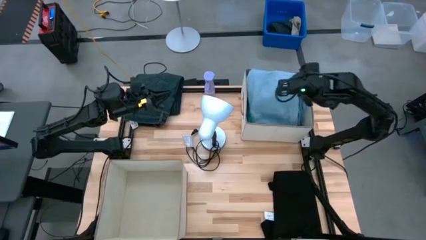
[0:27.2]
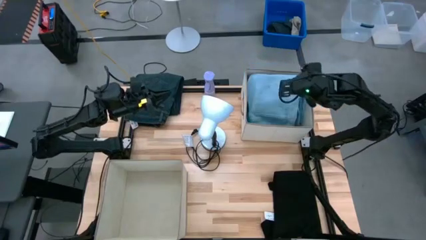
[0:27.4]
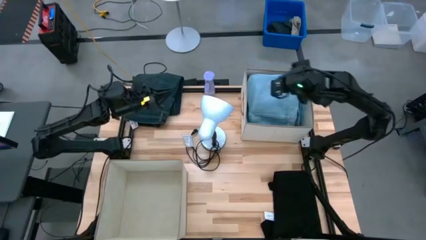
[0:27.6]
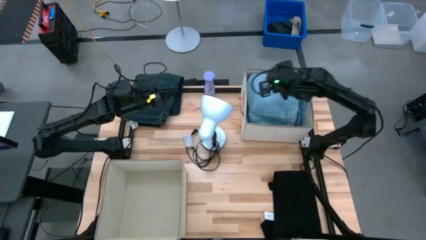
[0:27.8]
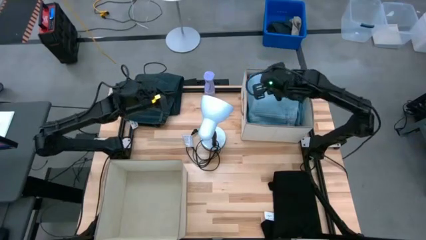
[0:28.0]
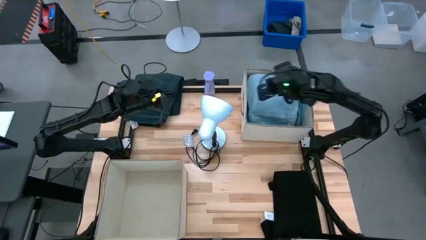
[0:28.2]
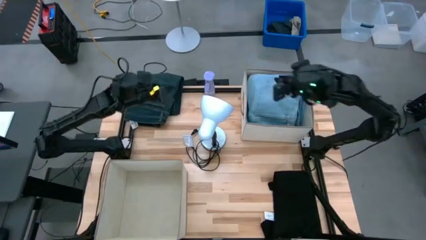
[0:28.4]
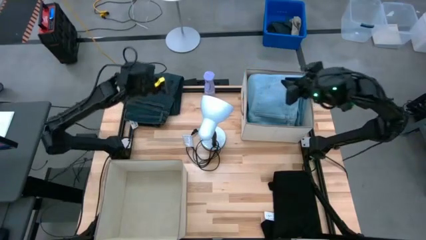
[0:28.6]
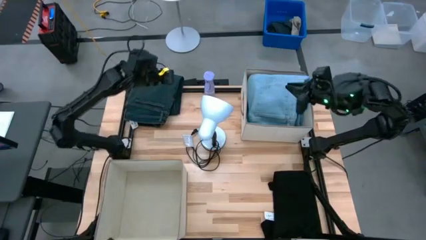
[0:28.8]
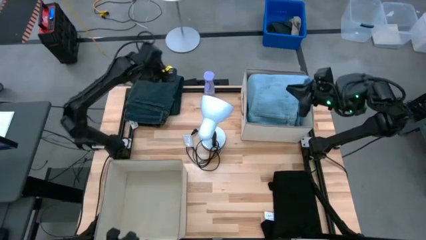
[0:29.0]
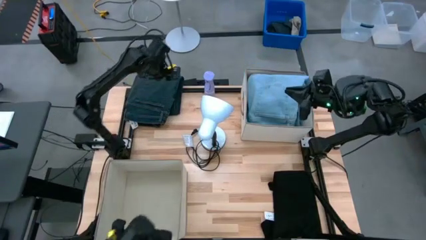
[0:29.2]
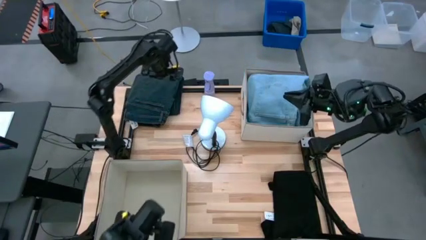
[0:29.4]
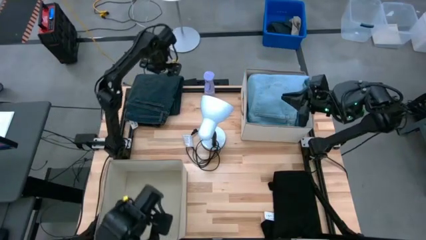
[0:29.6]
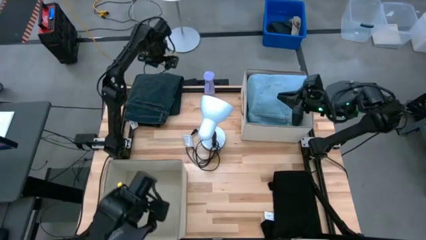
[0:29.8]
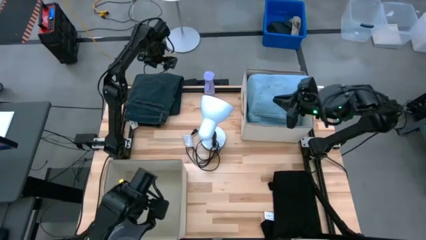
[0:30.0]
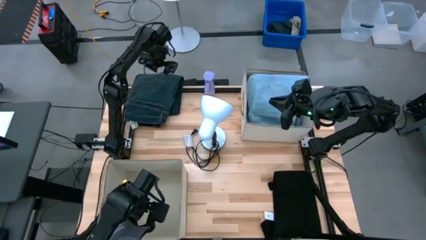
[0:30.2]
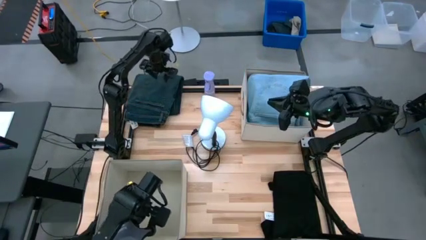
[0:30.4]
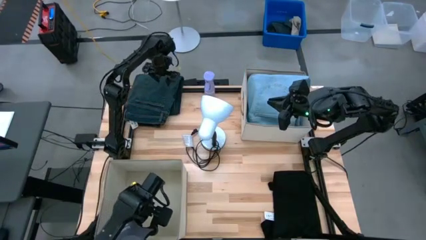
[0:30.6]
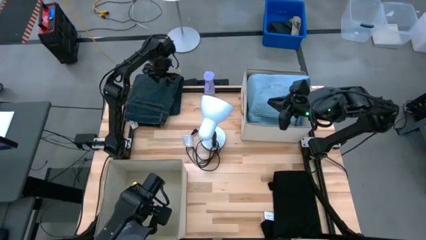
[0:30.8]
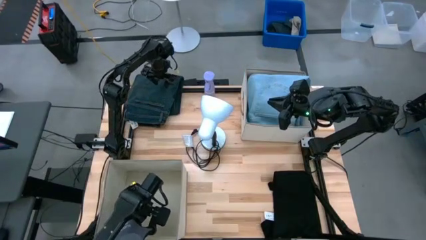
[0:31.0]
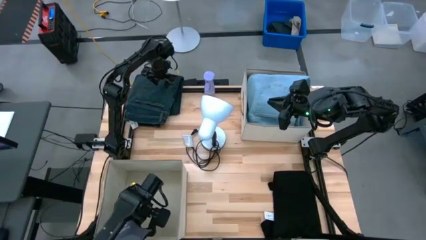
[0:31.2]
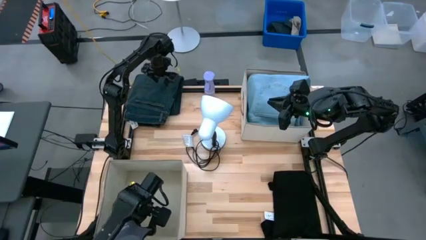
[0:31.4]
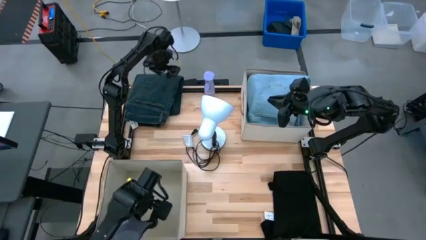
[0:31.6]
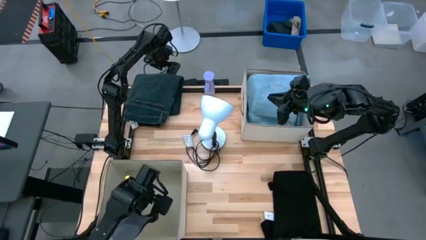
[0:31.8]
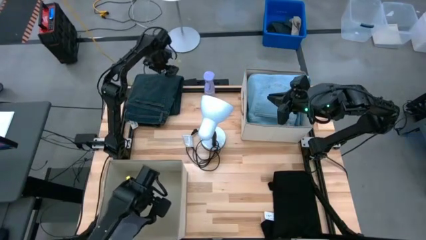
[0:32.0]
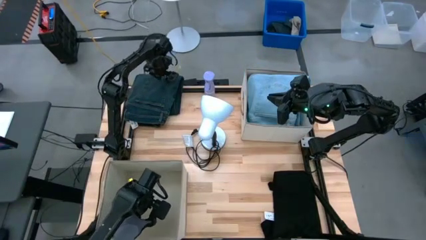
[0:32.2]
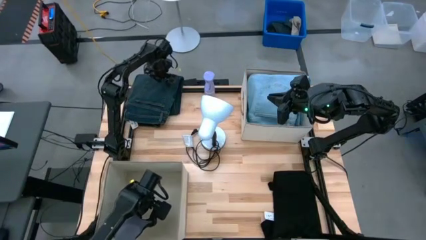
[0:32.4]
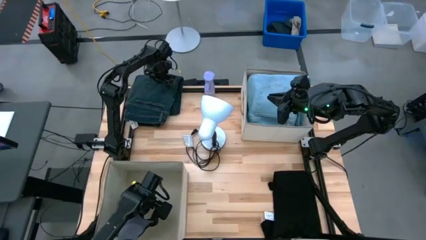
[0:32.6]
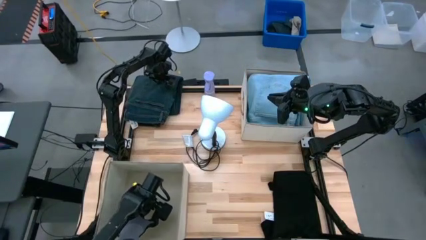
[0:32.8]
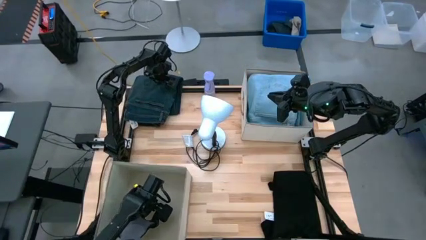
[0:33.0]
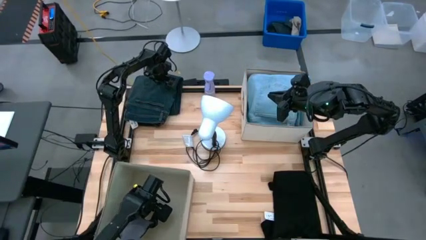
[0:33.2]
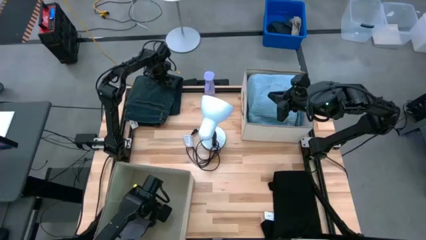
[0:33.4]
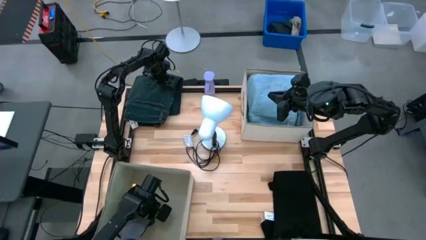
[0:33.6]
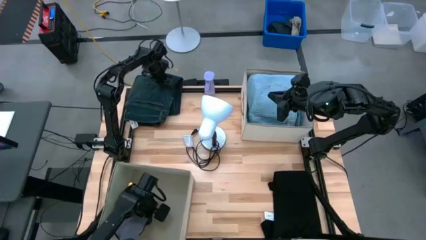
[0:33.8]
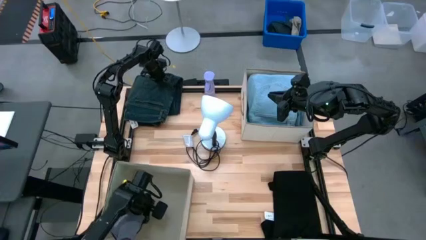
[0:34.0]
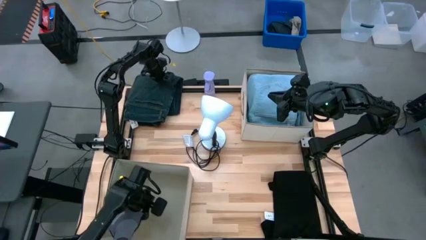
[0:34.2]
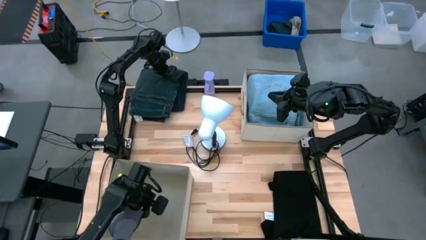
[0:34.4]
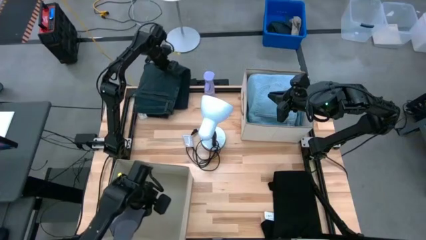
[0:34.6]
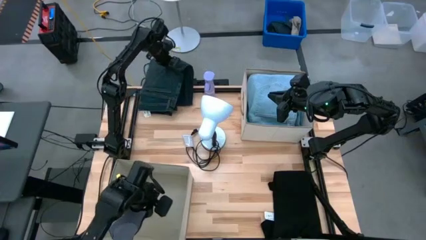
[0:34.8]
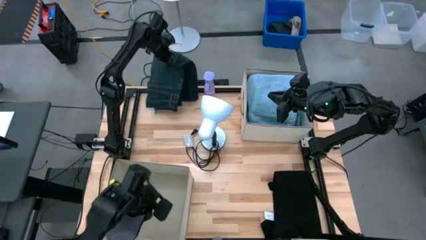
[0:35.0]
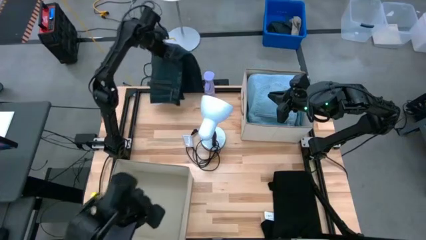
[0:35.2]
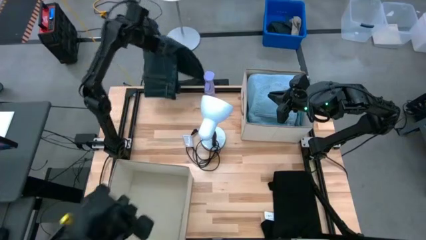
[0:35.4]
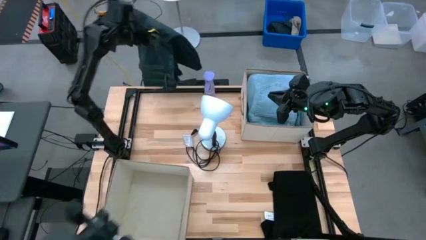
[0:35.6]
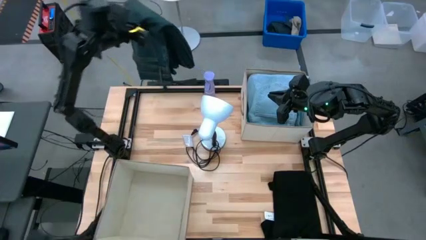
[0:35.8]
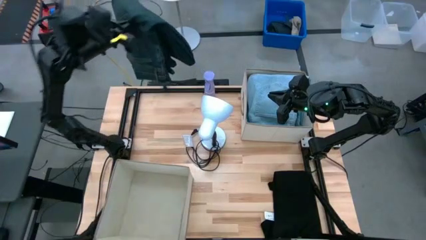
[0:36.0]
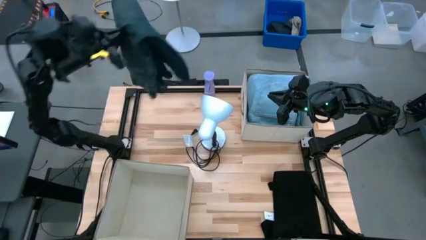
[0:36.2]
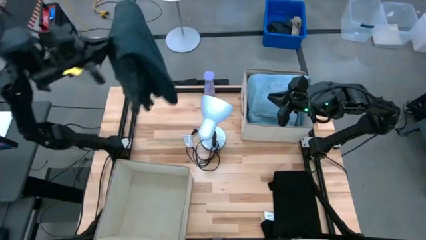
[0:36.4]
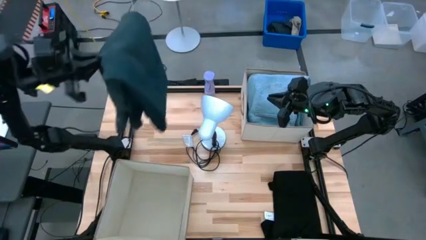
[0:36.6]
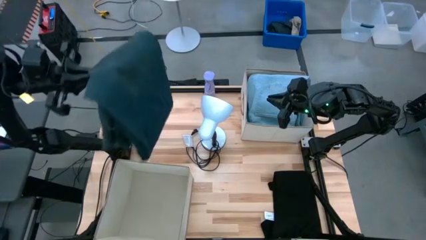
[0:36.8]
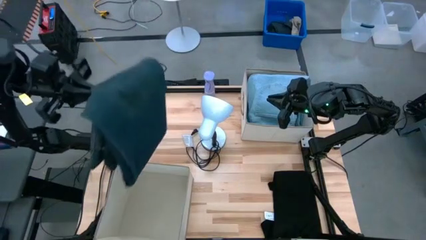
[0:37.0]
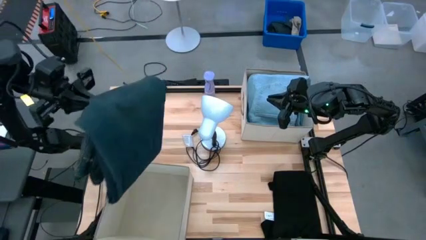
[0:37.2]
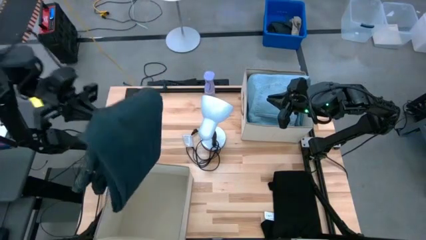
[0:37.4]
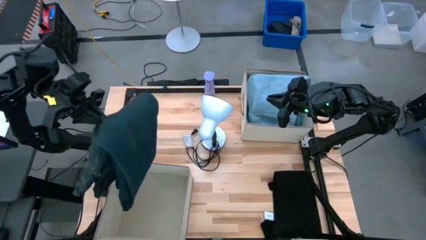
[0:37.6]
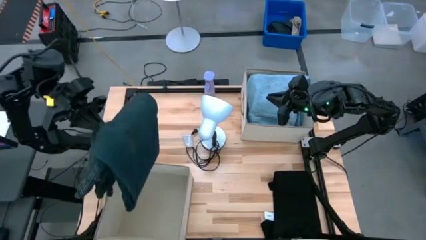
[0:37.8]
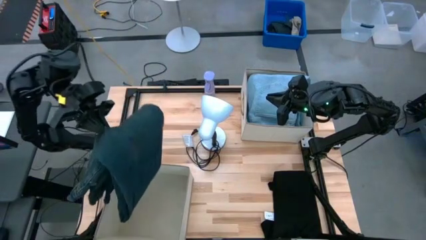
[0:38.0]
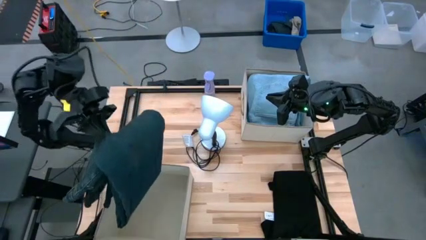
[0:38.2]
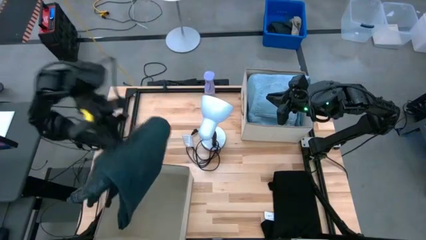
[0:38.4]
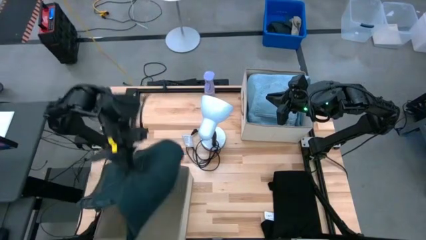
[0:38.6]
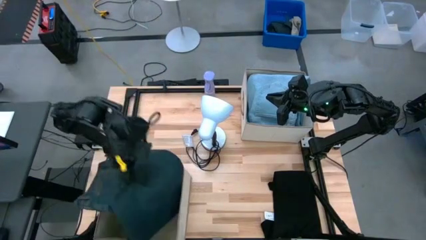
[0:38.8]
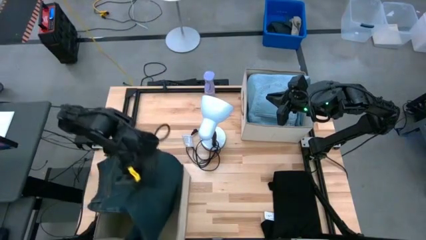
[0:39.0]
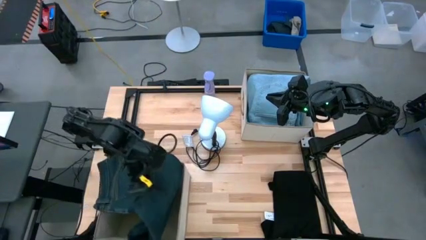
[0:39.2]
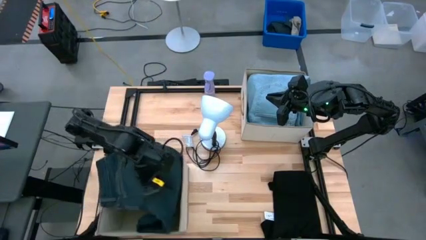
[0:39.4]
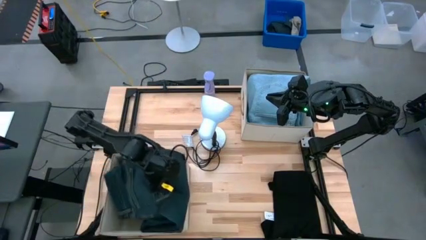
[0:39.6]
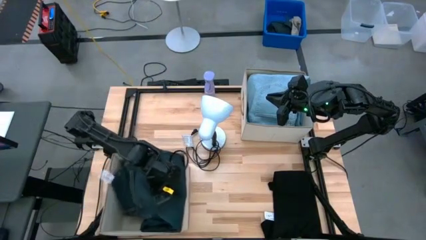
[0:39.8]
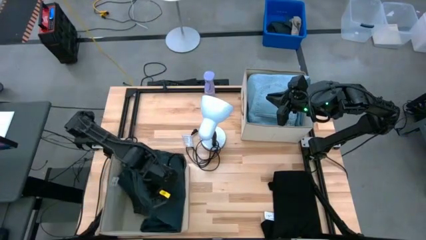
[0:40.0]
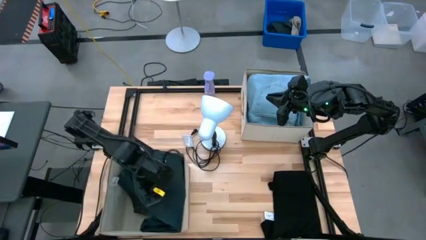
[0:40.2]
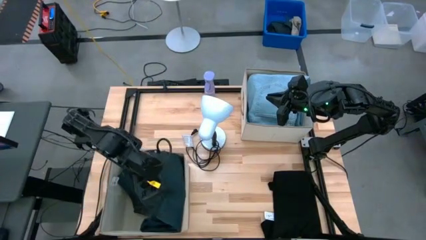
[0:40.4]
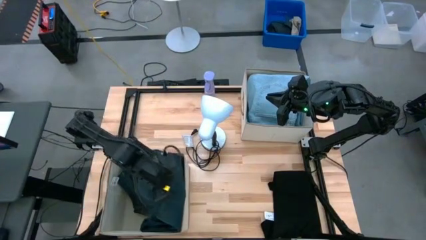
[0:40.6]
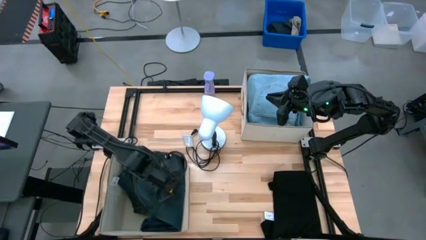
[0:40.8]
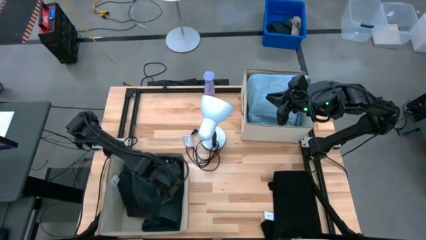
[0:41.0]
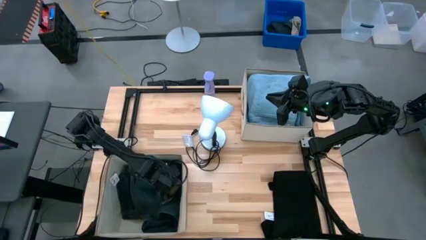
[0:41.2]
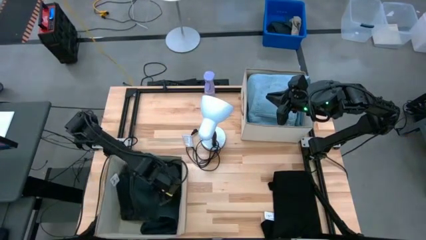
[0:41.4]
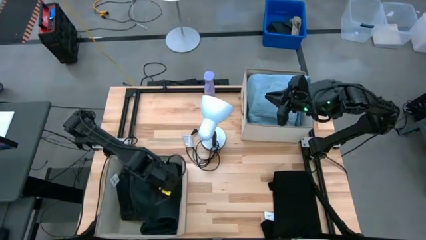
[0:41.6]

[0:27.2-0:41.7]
Task: Sort clothes
Put the dark blue pants into the bottom laundry organizer
